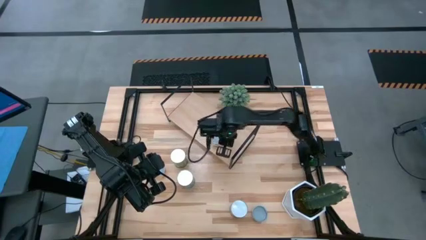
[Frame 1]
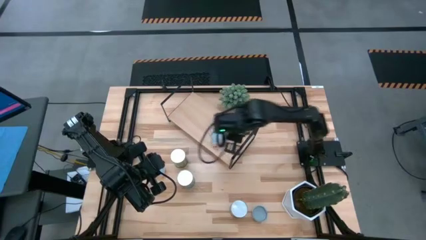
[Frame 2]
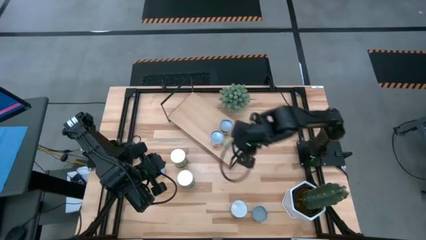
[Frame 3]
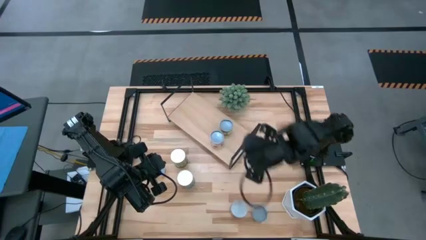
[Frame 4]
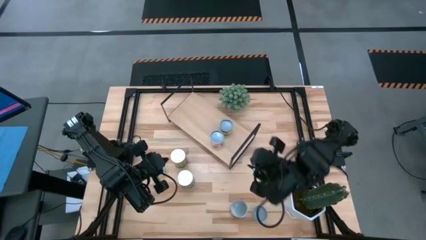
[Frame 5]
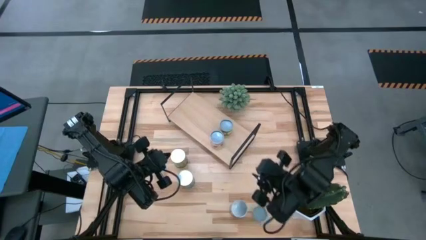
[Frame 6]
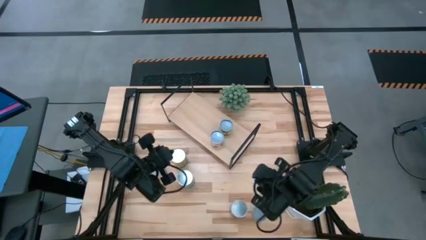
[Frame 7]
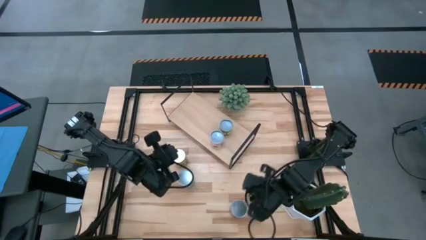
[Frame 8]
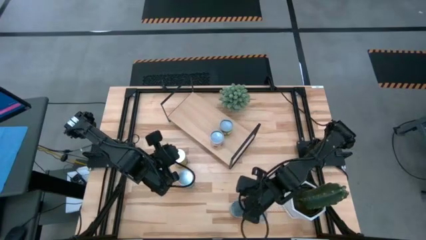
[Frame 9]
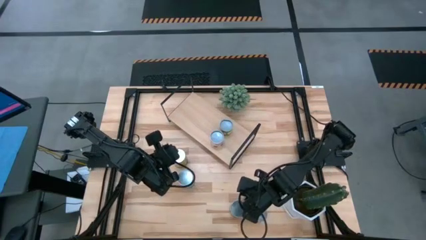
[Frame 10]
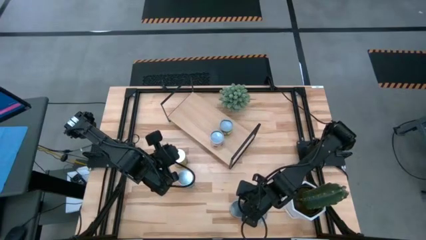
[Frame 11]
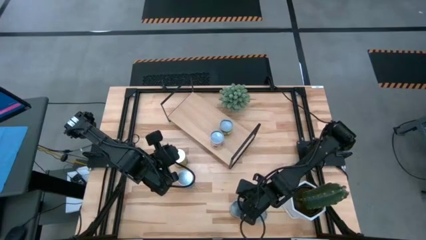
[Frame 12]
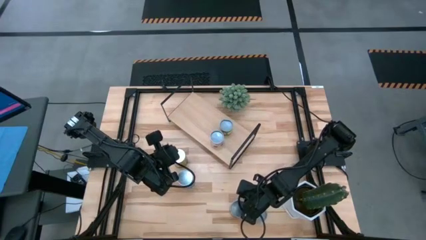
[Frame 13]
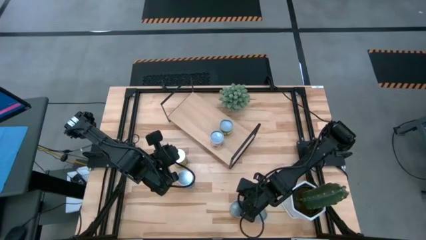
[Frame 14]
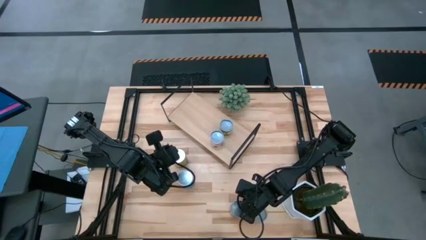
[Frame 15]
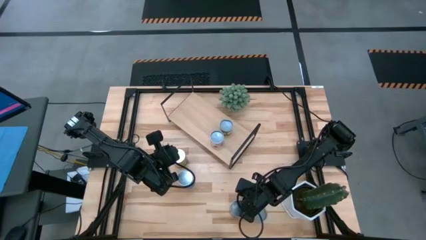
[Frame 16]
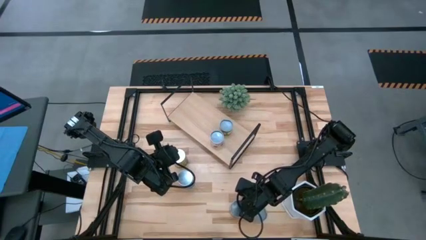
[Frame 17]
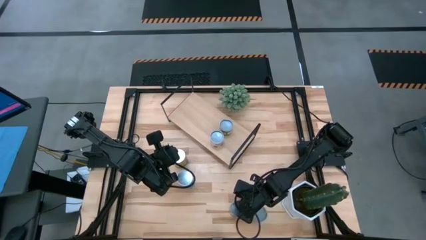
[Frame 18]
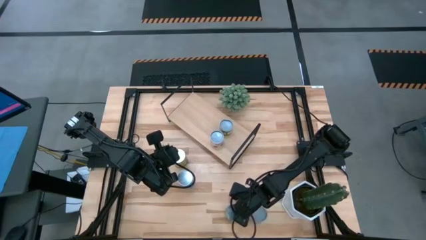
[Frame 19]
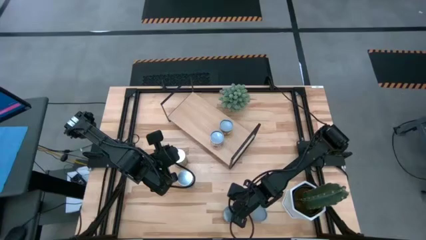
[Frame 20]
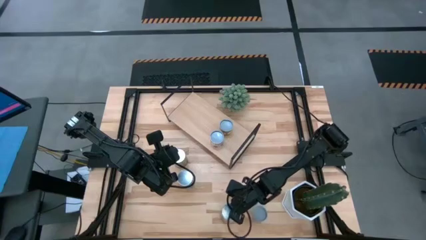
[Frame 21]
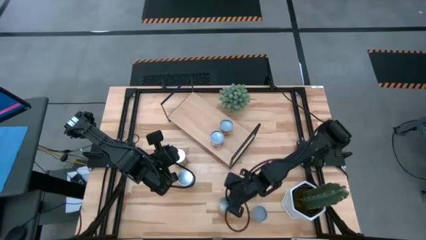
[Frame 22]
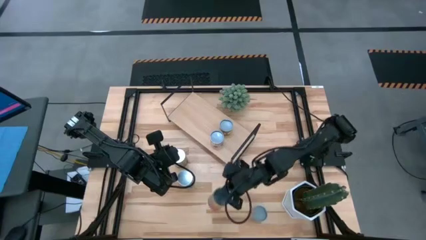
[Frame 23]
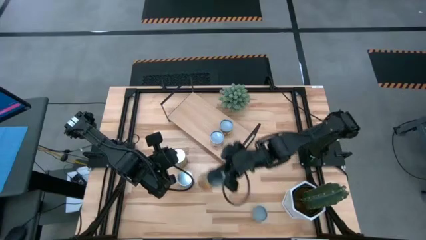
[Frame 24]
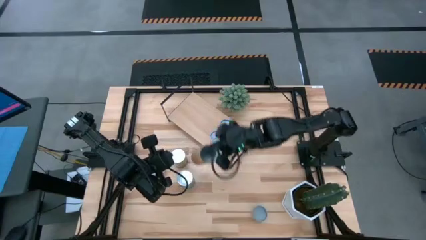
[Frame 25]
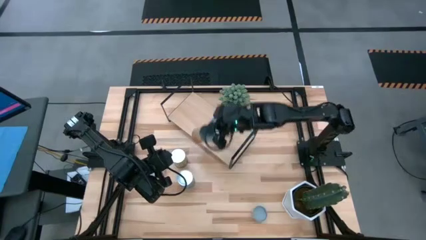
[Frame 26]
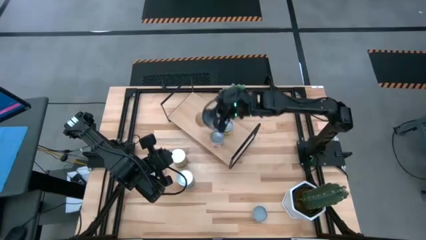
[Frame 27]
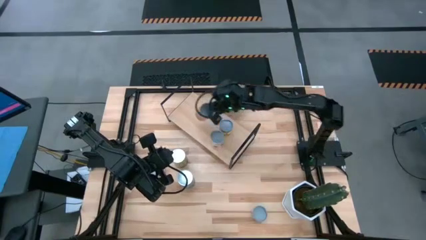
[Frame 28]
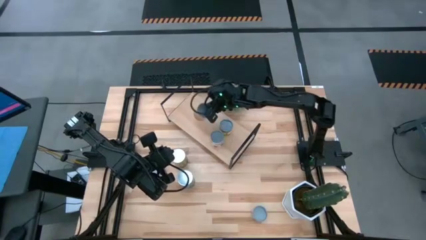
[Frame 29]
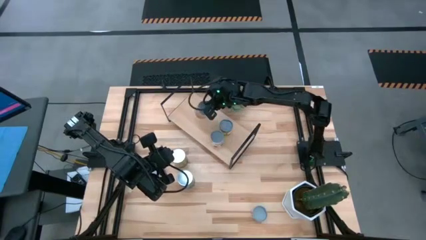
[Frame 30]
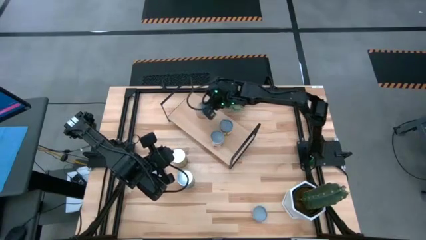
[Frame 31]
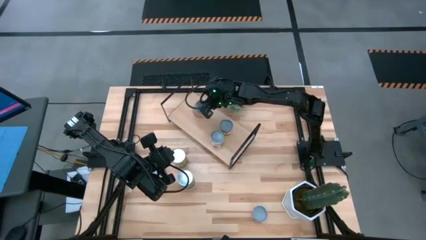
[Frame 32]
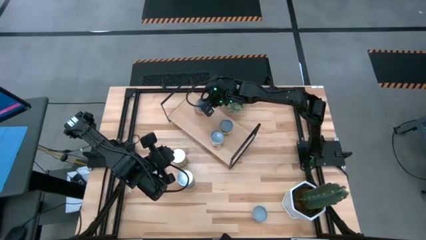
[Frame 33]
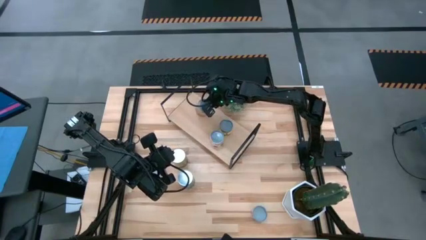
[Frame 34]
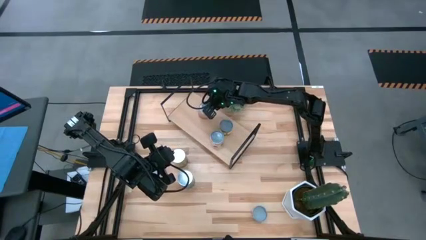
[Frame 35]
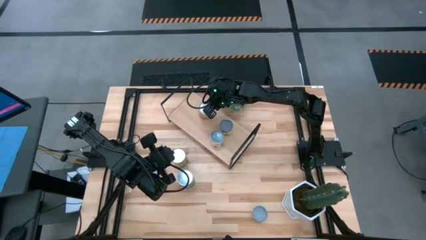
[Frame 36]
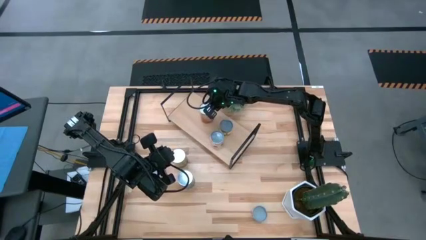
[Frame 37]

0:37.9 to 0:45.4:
Task: Pick and place cans onto a shelf
Put the canned green beans on the shelf

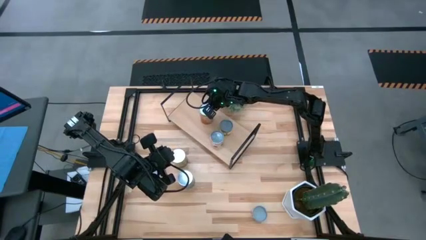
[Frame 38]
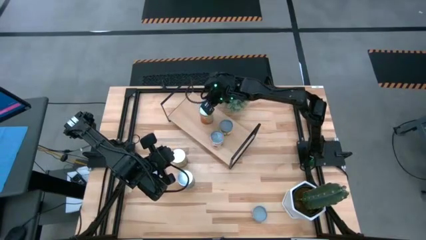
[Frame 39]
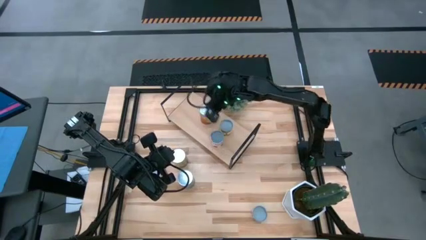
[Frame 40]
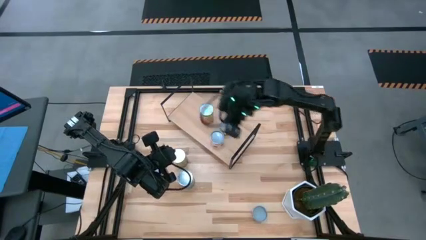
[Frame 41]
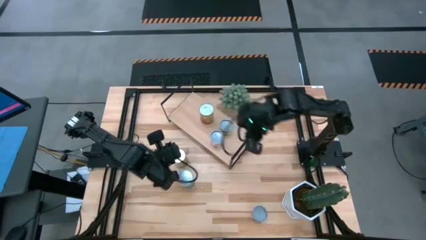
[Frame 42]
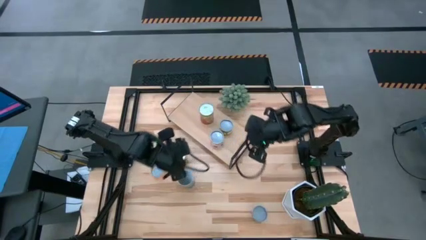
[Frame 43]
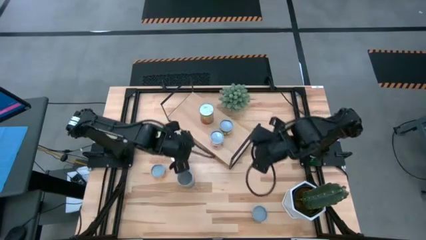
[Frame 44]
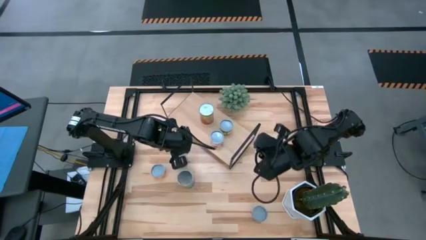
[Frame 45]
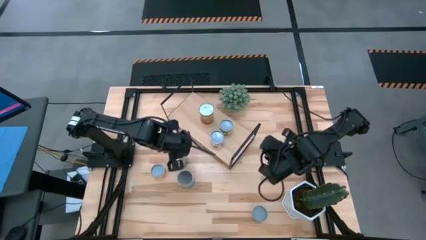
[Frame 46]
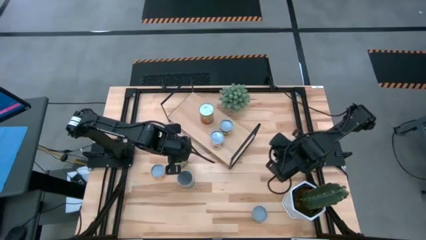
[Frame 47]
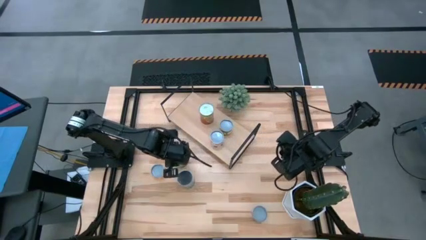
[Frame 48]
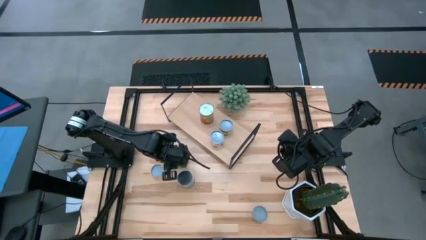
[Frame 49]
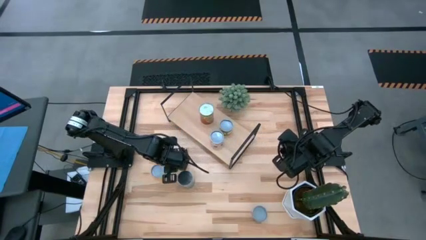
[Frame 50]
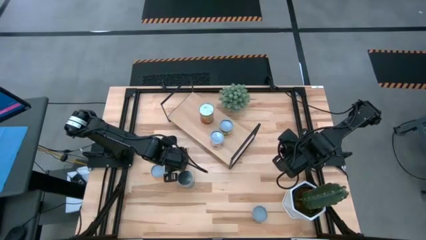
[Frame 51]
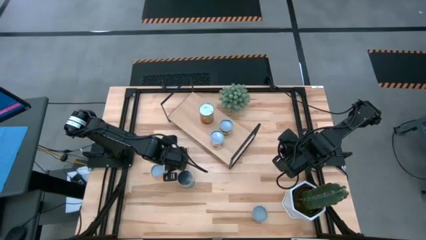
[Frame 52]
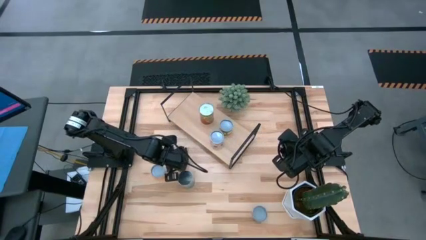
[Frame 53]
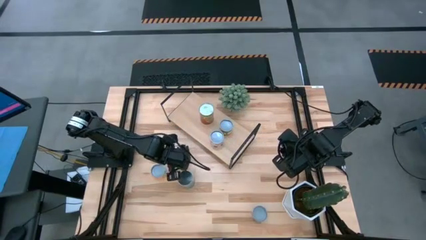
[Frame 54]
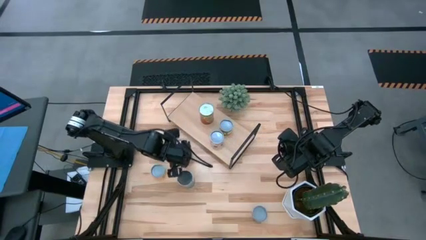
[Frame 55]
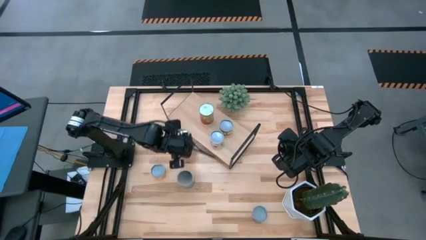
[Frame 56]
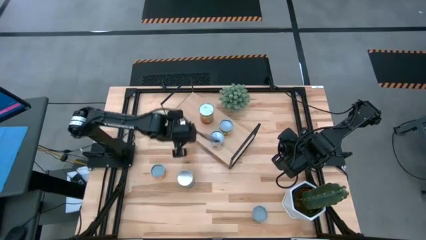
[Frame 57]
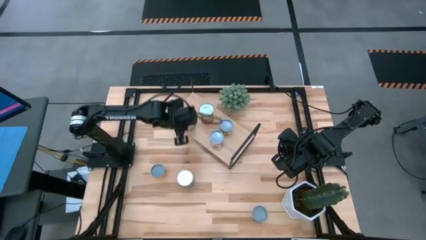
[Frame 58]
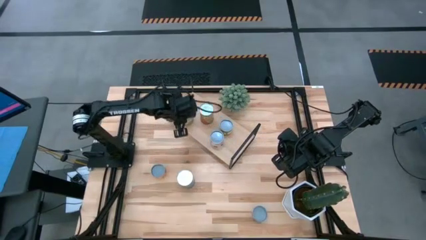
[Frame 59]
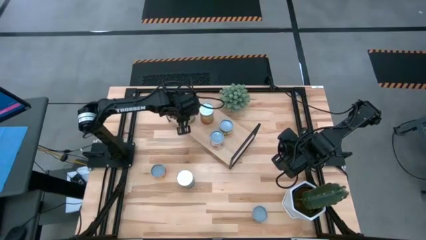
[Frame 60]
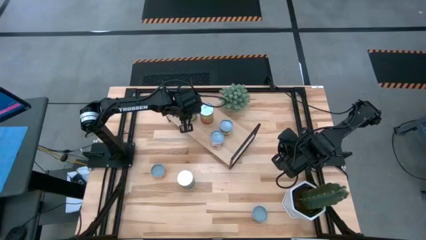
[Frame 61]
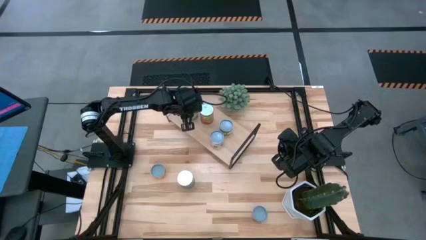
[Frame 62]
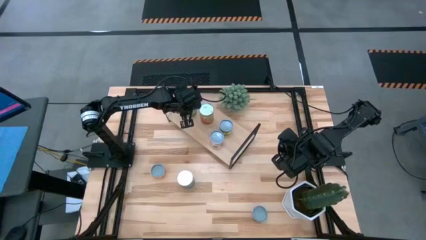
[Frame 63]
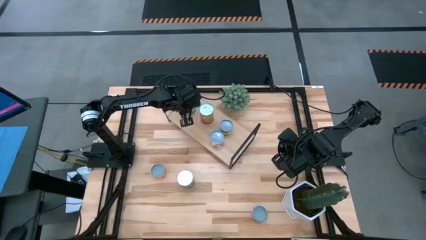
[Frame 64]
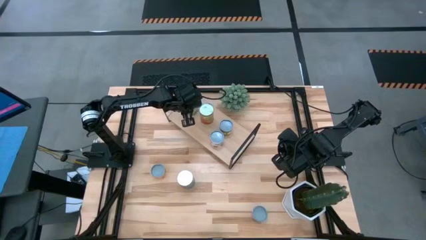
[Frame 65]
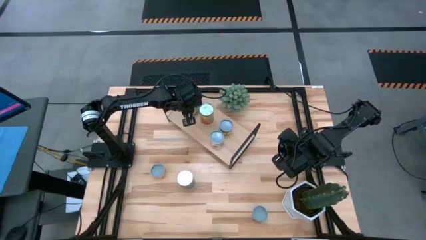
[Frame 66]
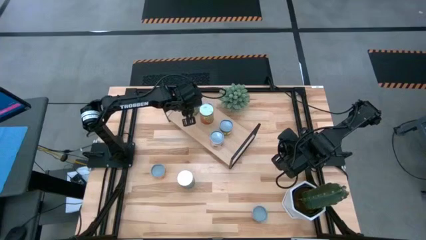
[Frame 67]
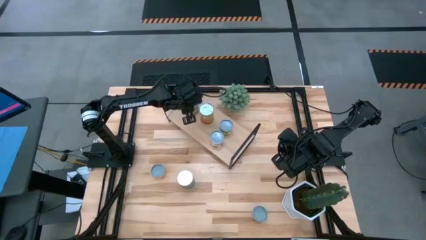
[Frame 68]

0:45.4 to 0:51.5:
Put the canned pears on the shelf
